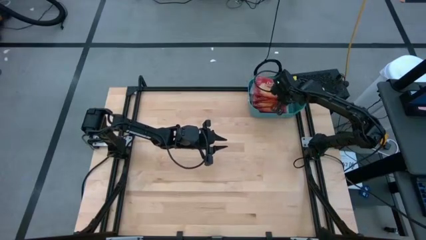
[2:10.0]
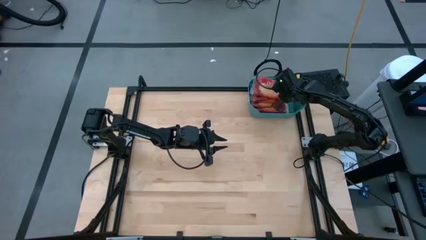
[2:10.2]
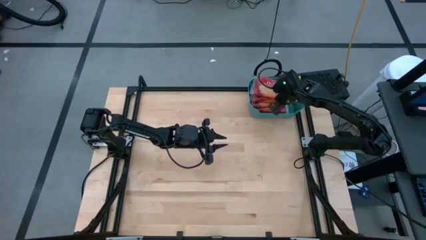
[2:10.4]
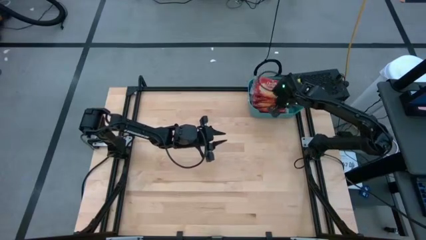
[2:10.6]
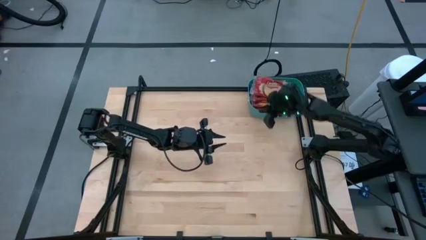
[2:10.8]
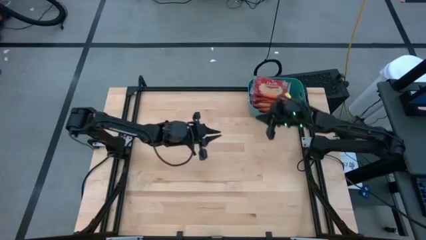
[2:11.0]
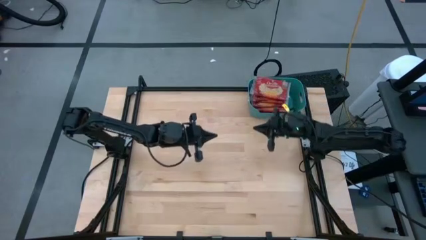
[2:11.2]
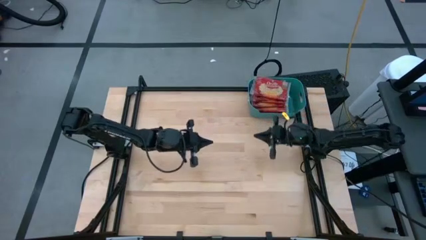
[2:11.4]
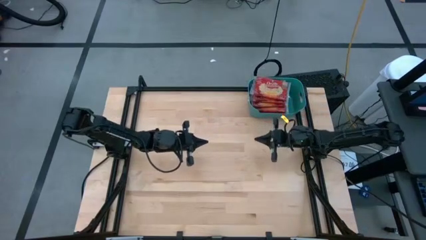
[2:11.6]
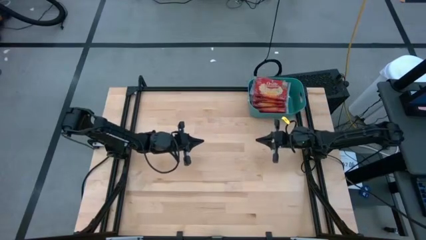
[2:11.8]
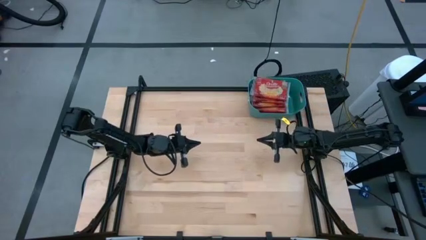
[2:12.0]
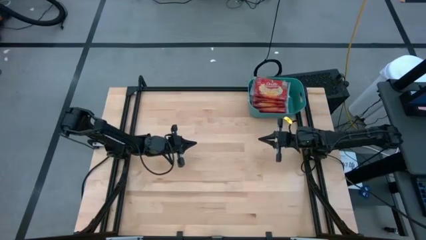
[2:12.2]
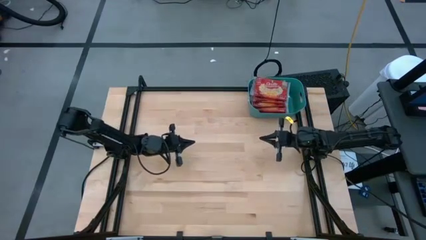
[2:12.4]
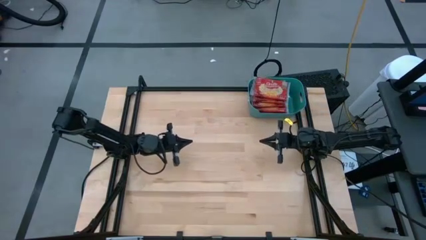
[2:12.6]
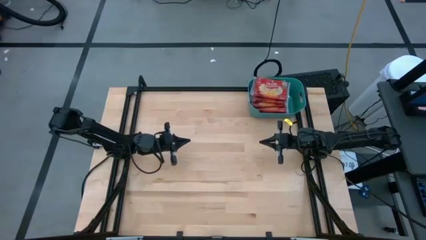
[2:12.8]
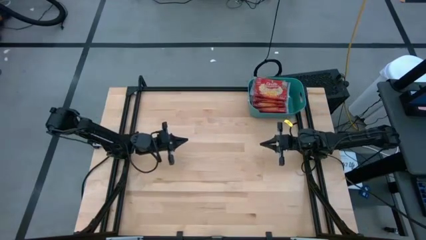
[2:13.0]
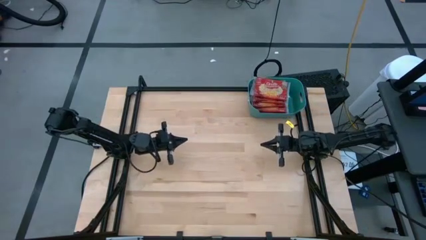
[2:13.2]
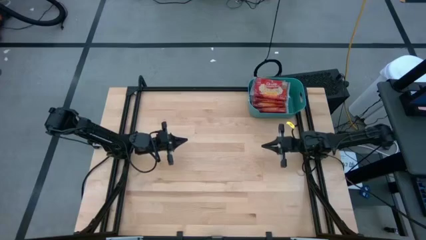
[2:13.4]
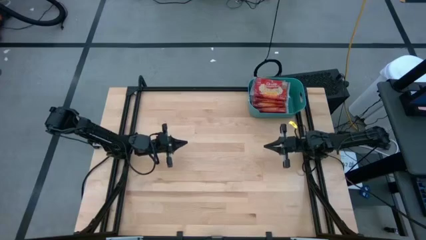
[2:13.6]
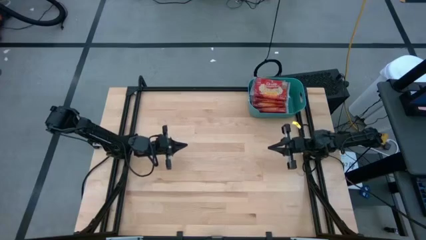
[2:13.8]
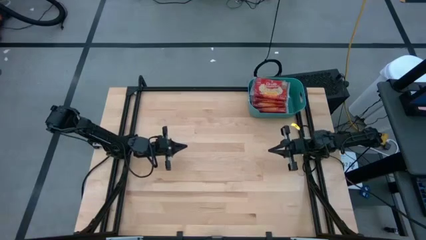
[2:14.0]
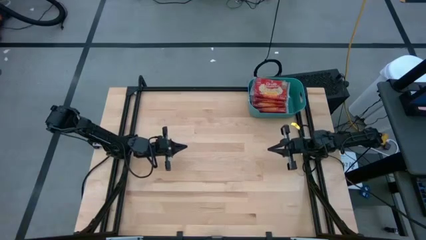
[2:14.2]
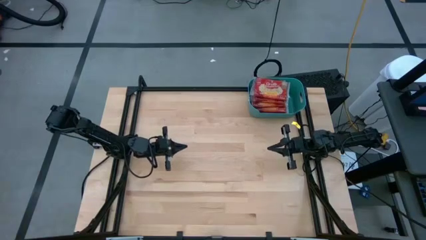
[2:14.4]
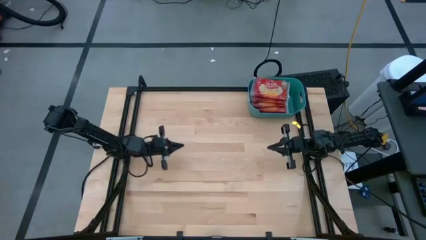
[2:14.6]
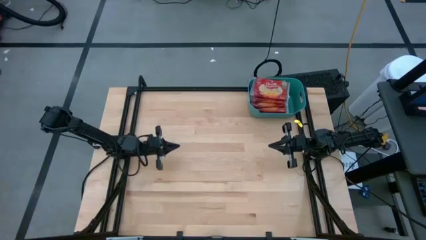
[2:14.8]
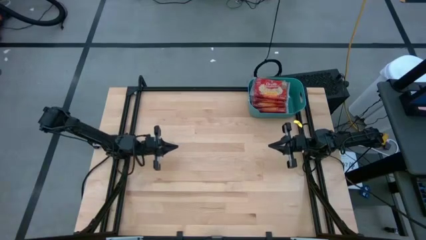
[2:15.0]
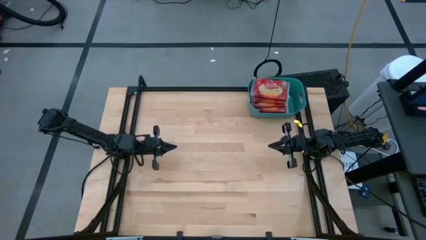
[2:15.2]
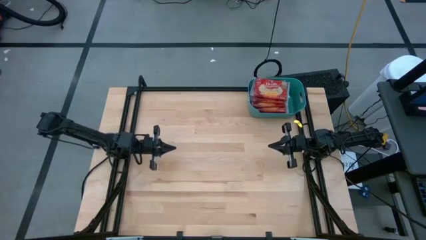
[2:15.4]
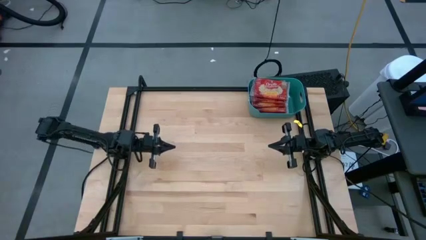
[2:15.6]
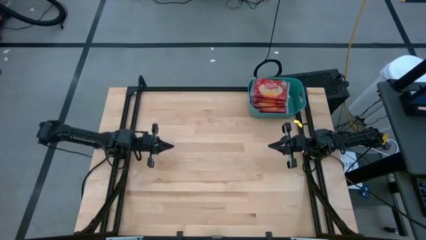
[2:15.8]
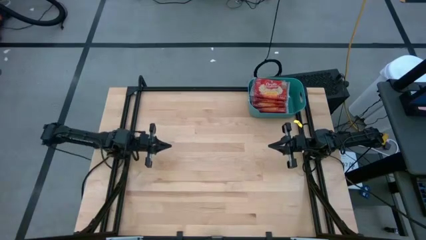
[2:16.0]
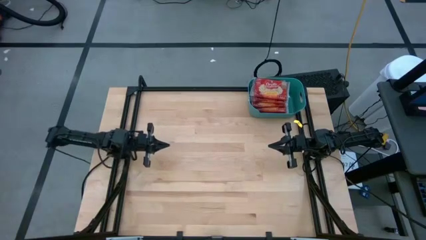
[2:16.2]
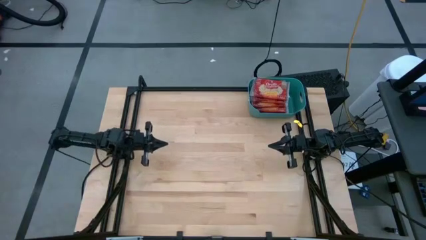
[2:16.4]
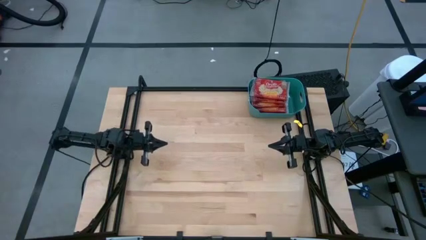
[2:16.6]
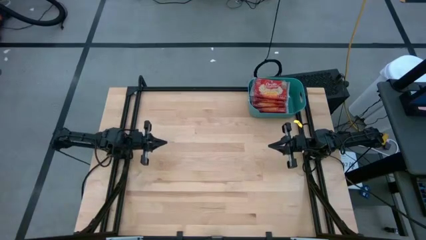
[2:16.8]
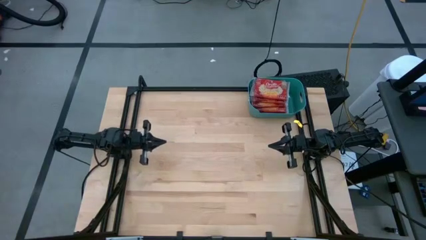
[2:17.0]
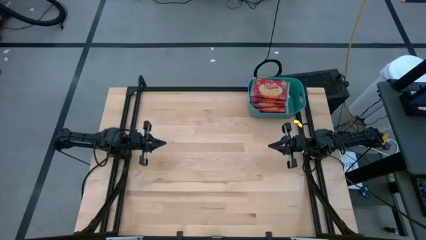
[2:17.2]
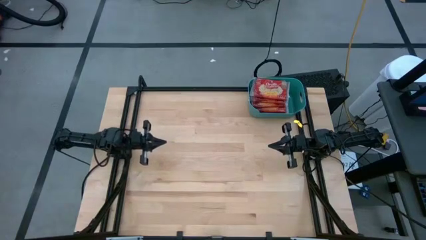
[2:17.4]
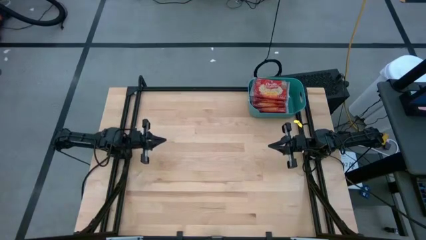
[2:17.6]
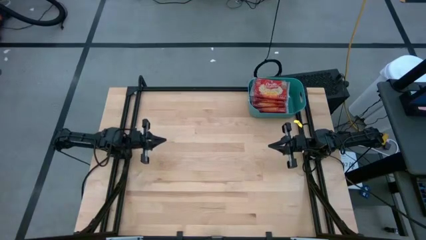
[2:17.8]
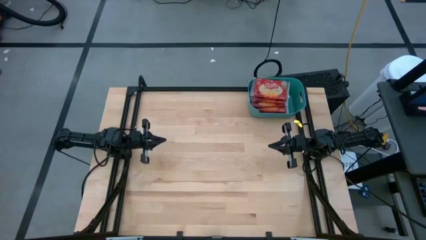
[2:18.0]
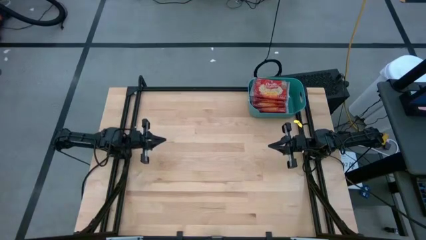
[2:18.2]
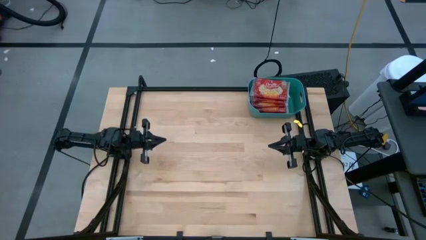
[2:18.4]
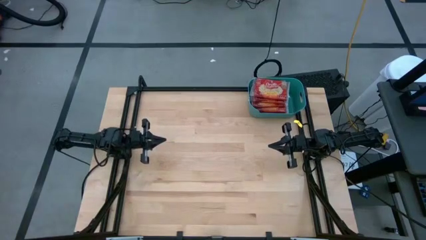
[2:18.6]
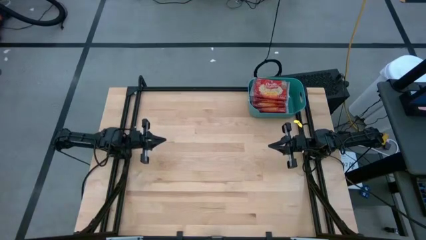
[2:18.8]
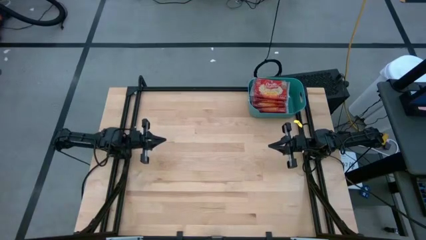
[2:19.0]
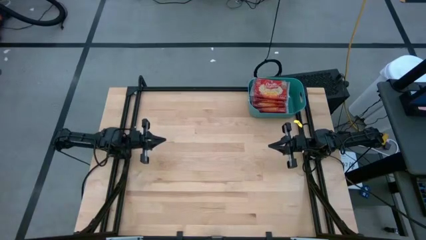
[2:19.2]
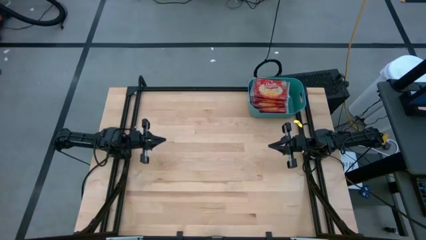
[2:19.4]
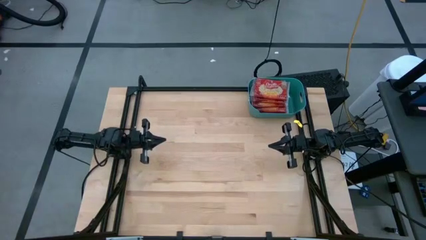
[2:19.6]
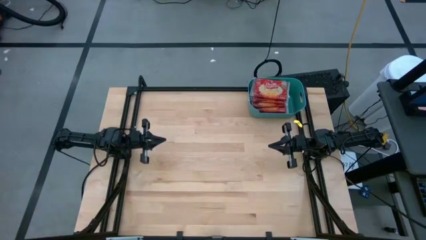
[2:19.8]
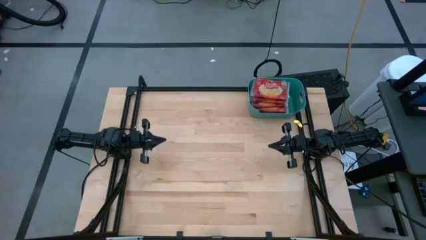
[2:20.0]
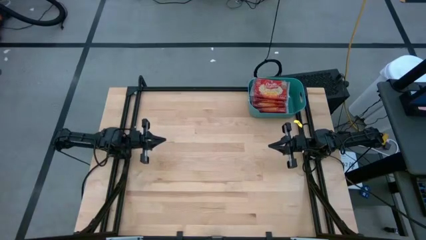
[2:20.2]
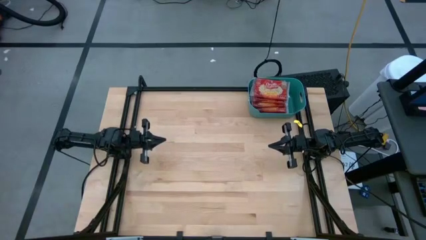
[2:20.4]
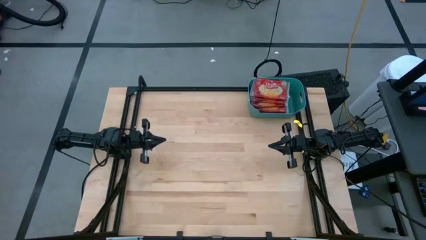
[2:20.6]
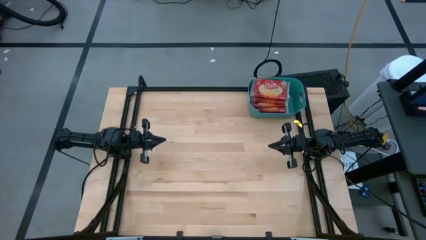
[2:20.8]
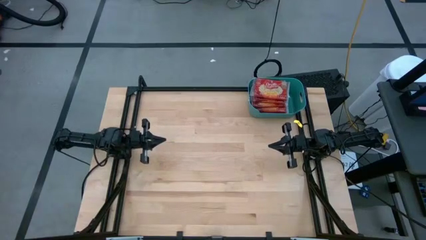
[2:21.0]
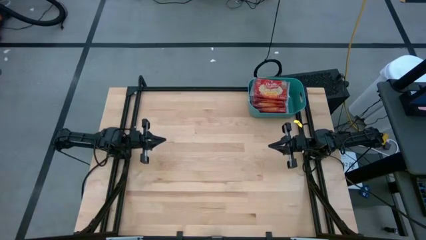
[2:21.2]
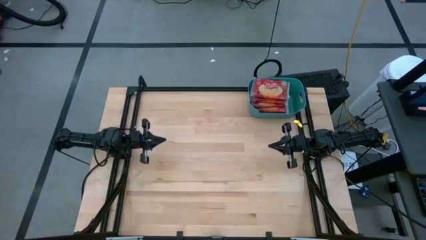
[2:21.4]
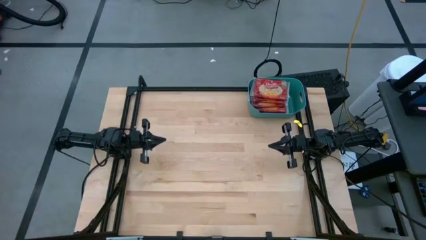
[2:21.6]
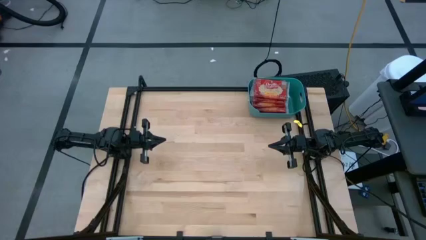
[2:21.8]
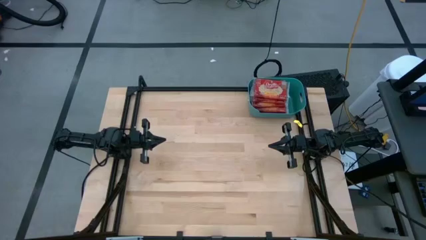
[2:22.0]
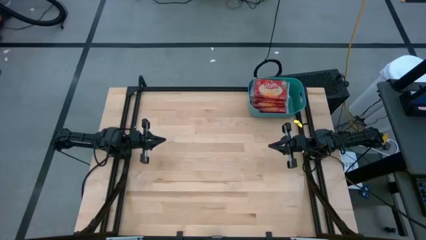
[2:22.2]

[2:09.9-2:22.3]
Task: Sort popcorn bags into baskets
Return to Home Position

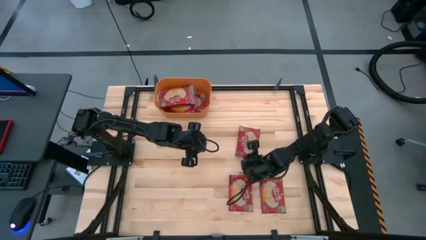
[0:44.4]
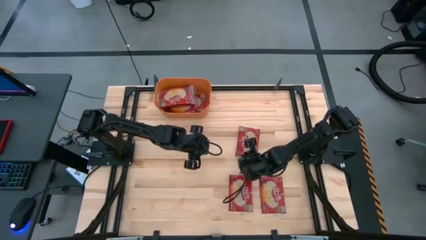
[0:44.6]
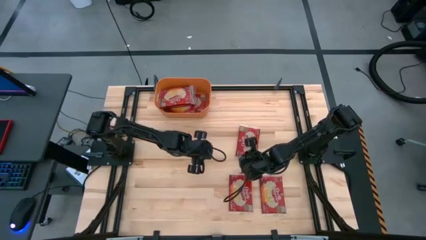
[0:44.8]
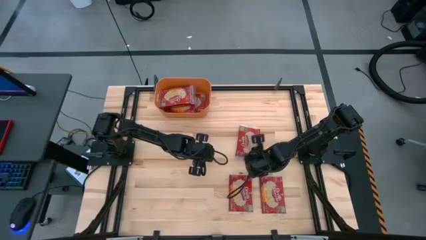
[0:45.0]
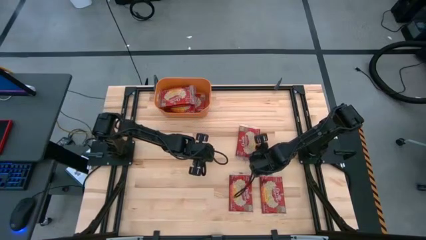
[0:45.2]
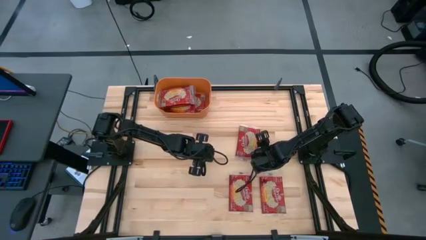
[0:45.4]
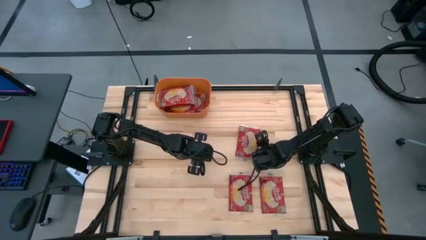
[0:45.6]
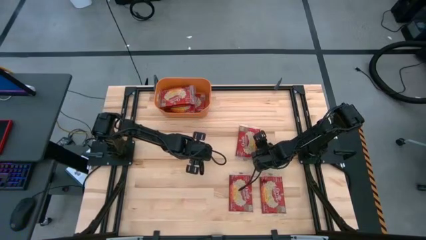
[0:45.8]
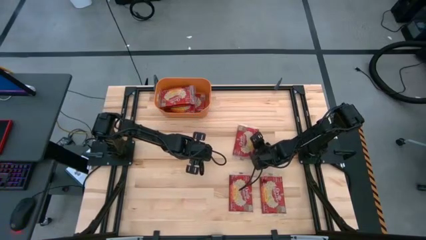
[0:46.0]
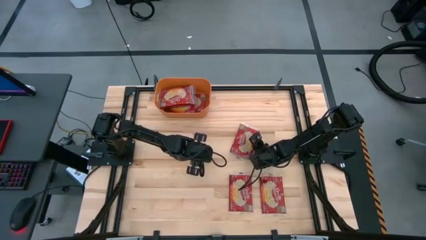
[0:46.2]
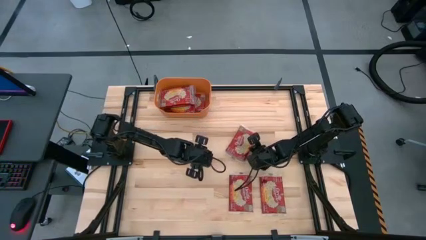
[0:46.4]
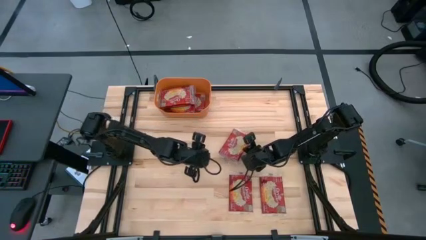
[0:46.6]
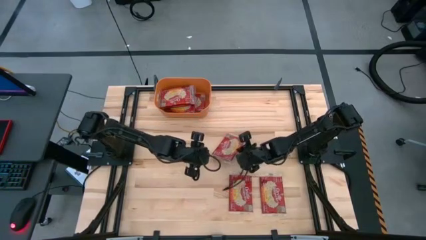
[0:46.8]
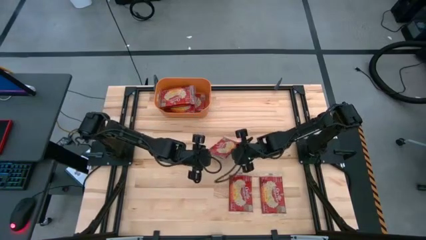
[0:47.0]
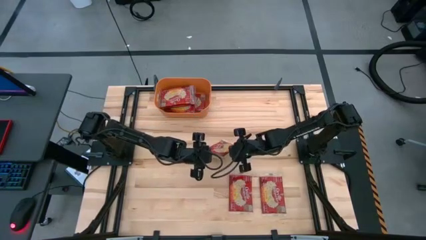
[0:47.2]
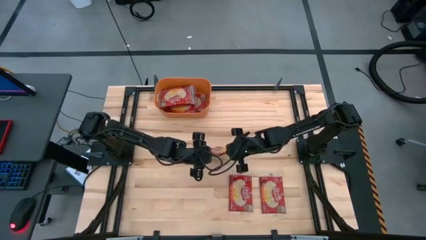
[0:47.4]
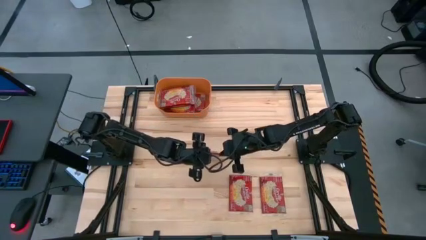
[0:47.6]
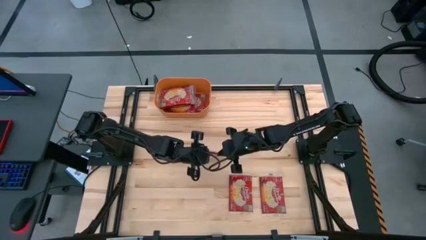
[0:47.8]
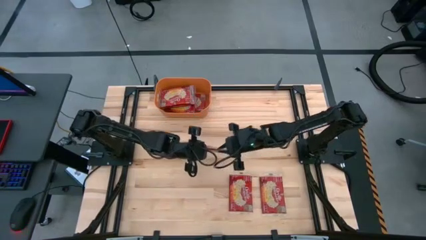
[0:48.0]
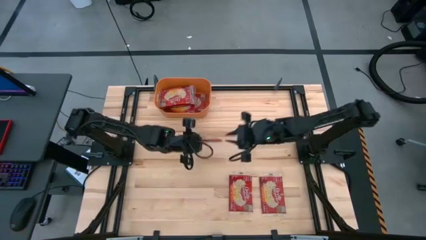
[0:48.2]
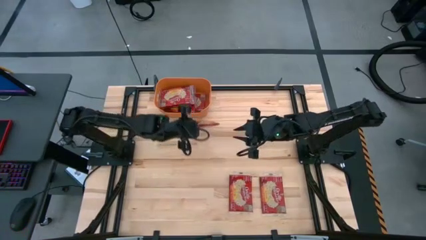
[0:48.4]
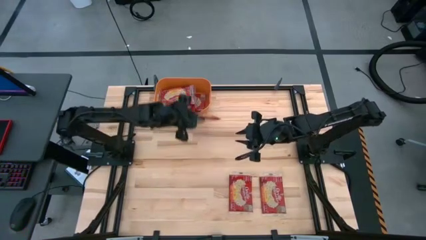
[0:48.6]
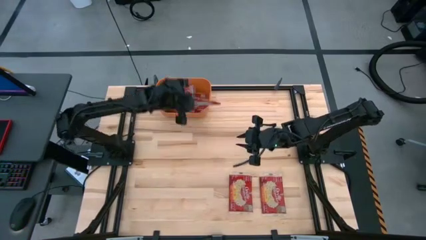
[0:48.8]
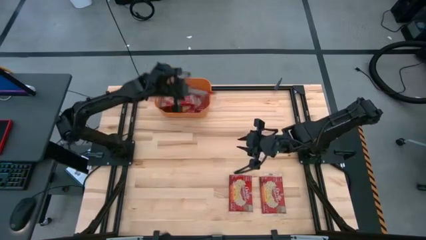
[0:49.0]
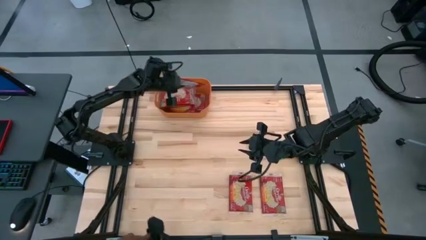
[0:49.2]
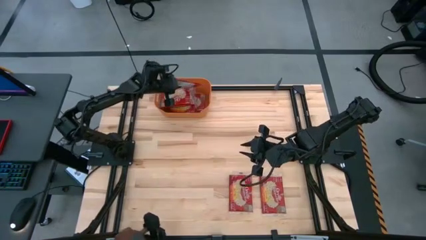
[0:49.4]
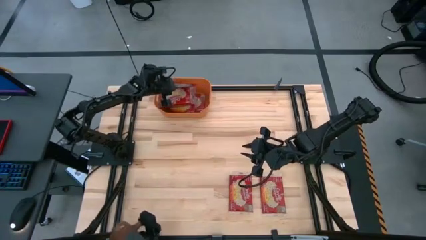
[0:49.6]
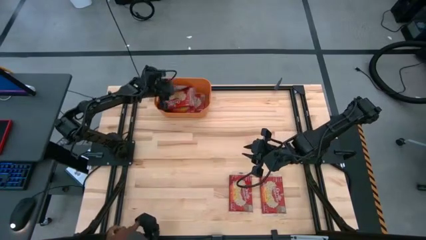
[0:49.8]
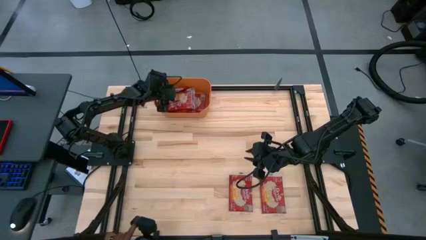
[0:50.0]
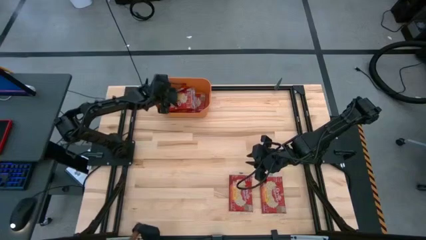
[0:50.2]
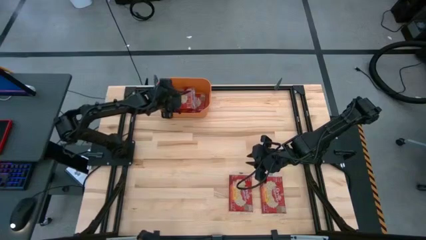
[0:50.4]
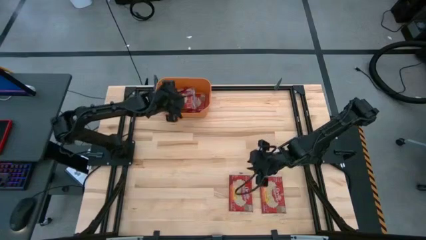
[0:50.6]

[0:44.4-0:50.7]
Task: Sort popcorn bags into baskets
Put the popcorn bag into the orange bin
